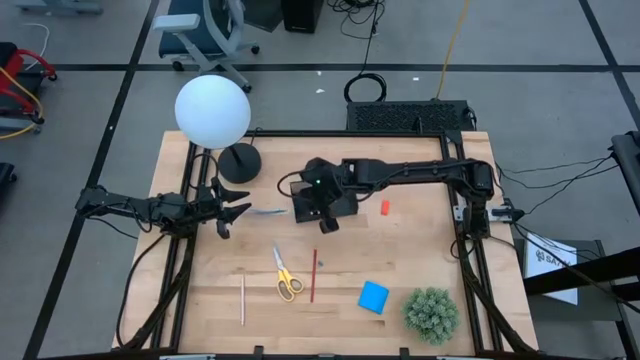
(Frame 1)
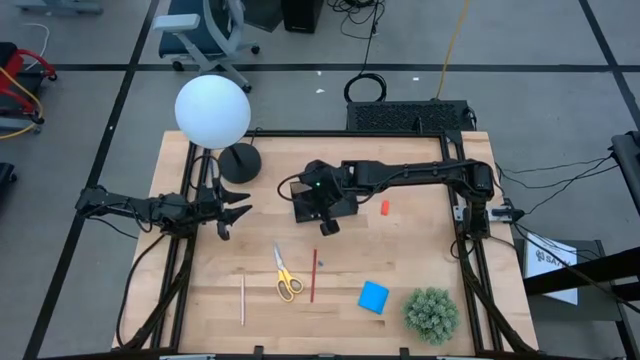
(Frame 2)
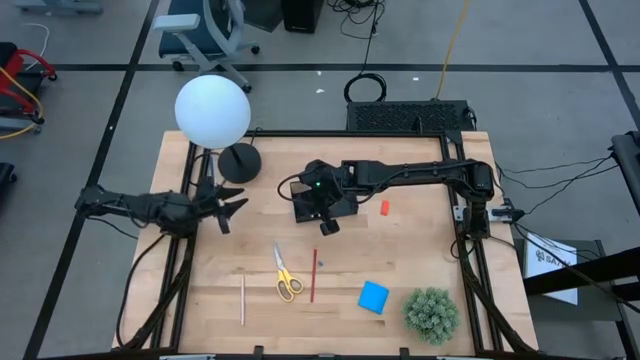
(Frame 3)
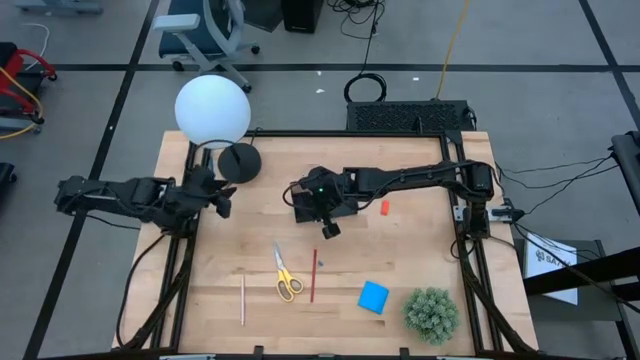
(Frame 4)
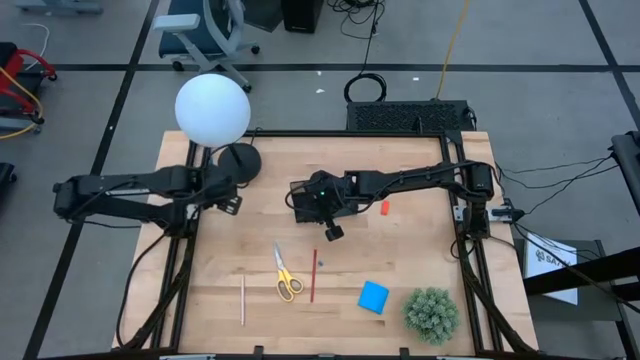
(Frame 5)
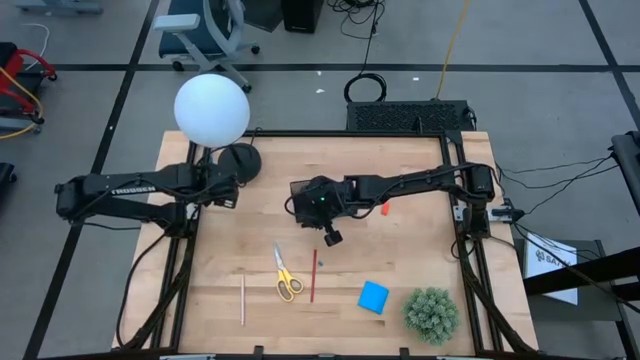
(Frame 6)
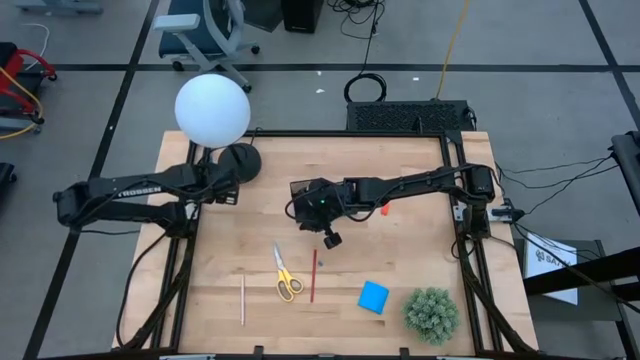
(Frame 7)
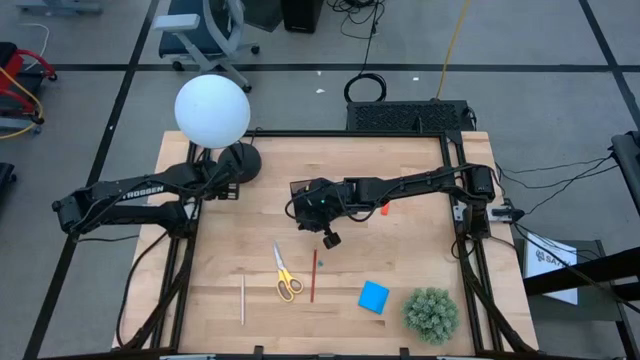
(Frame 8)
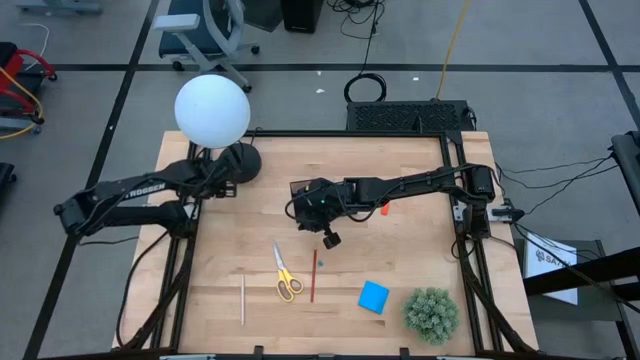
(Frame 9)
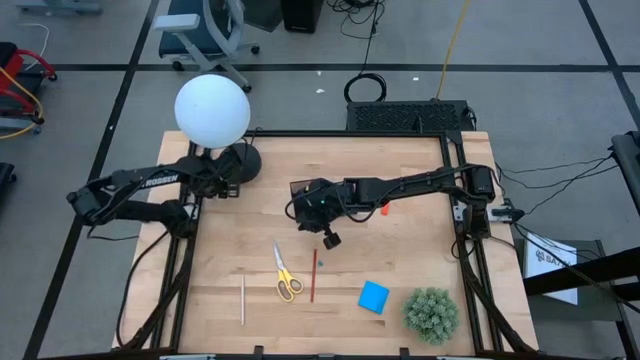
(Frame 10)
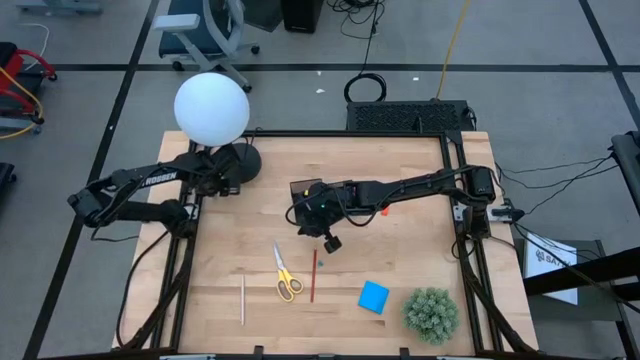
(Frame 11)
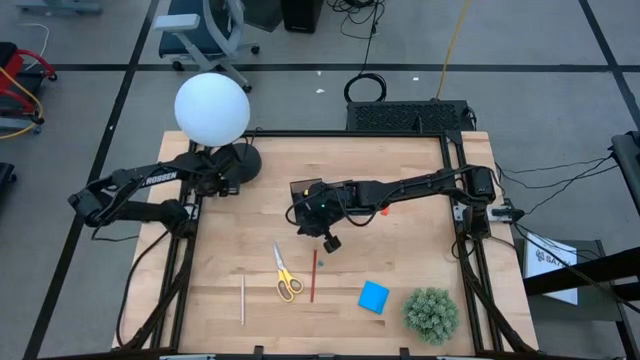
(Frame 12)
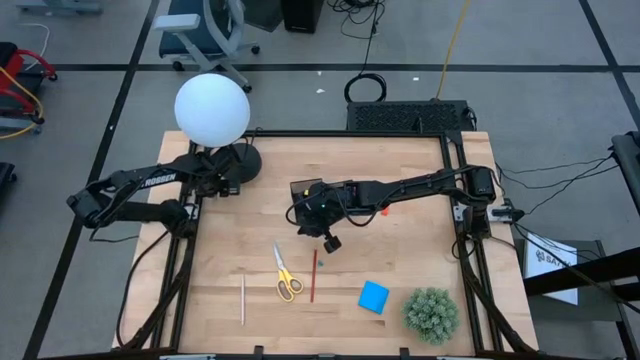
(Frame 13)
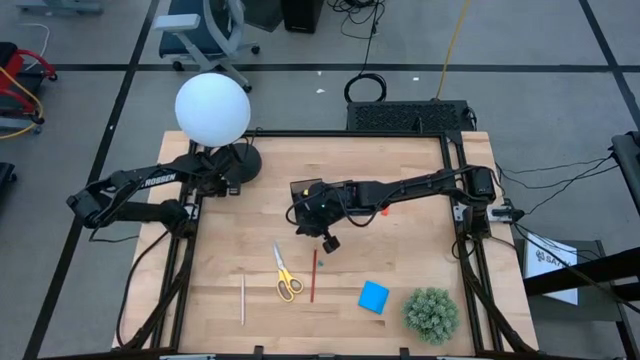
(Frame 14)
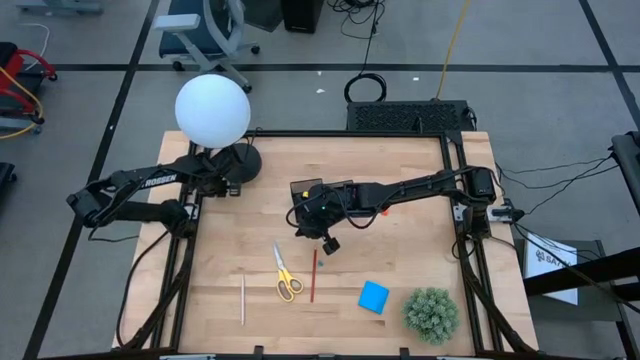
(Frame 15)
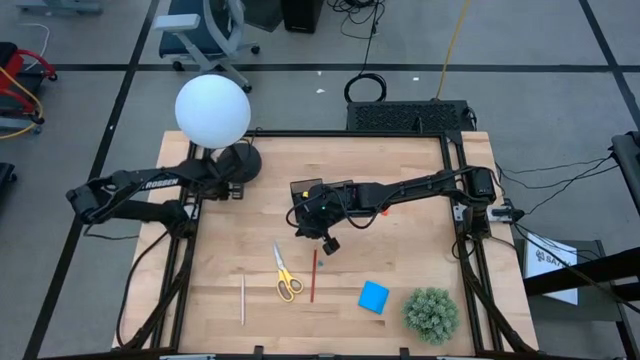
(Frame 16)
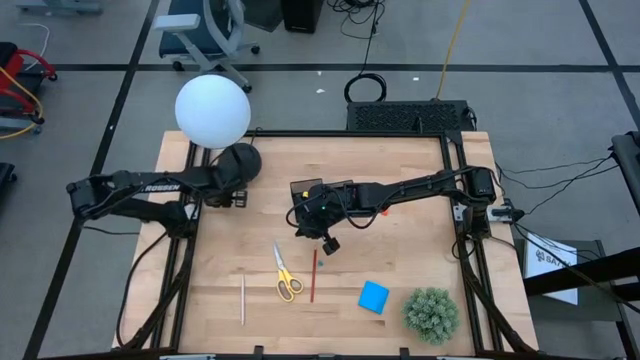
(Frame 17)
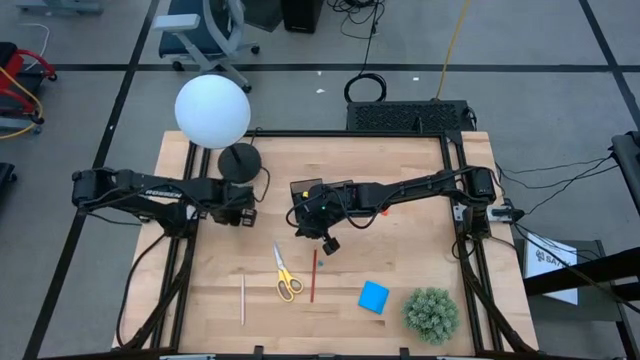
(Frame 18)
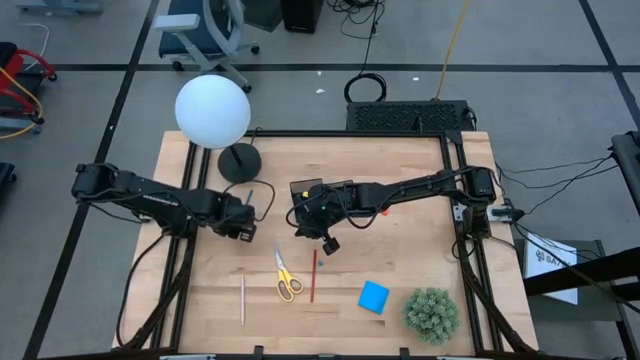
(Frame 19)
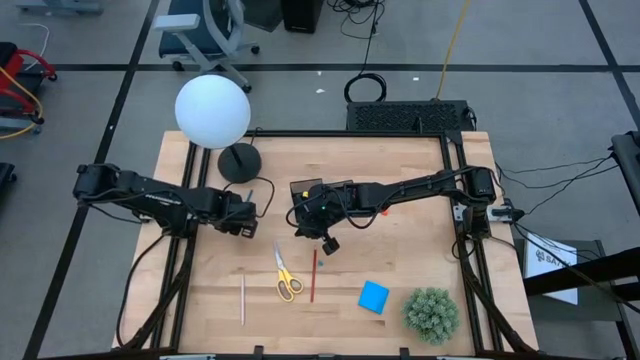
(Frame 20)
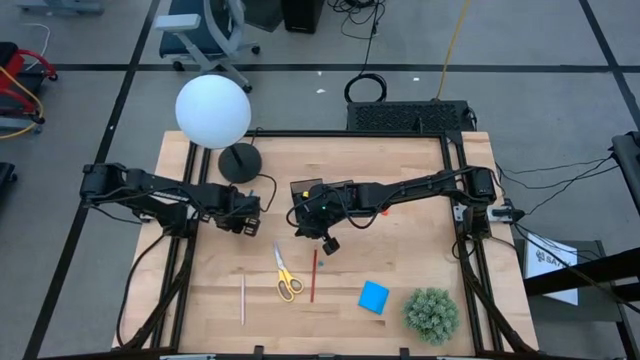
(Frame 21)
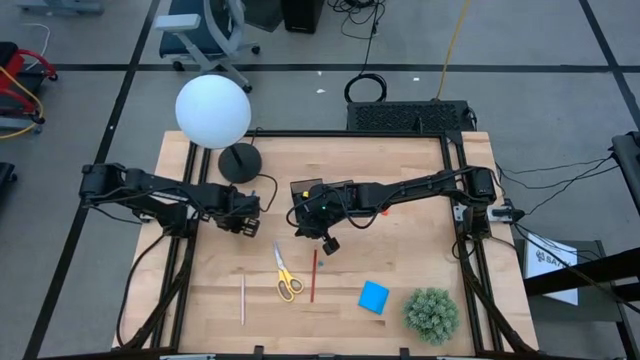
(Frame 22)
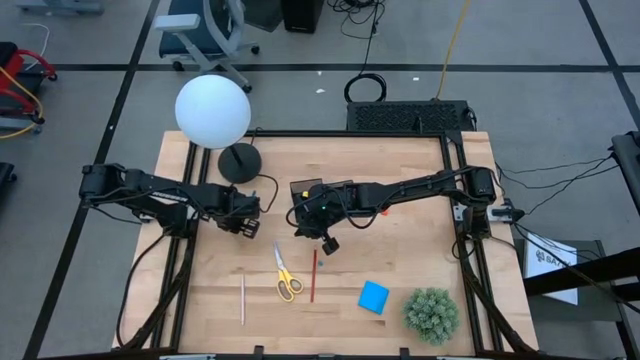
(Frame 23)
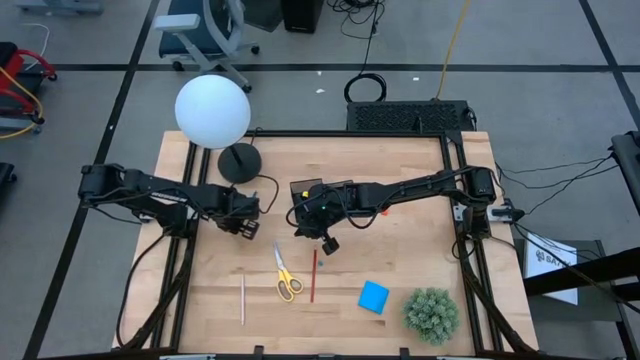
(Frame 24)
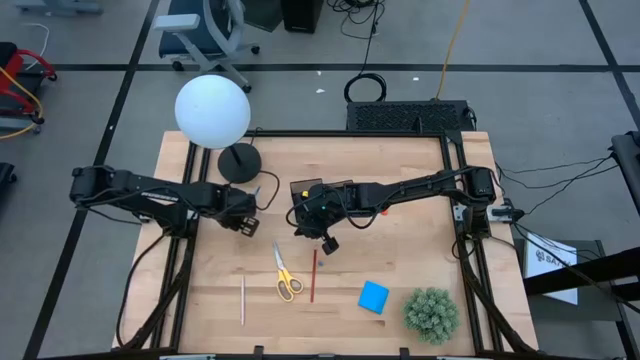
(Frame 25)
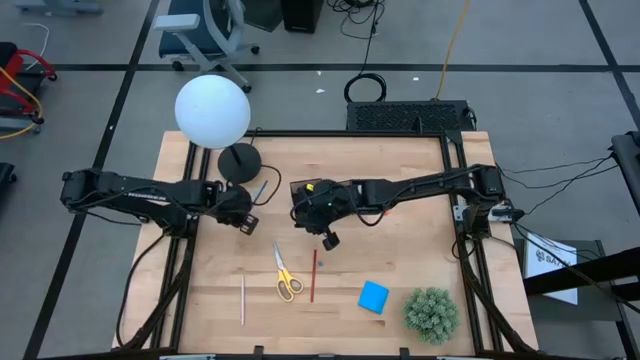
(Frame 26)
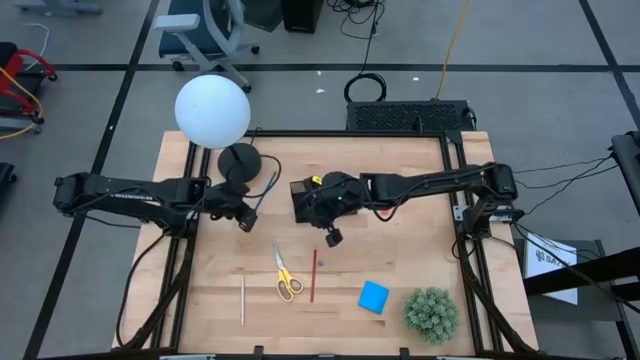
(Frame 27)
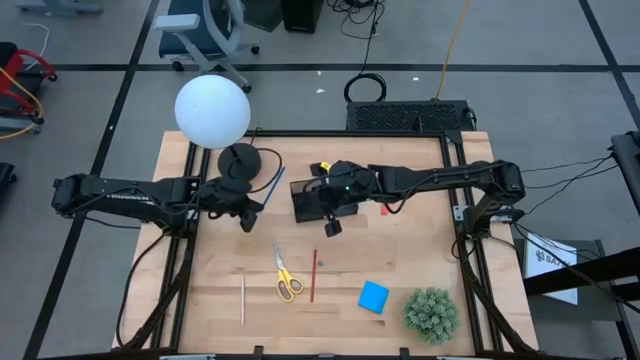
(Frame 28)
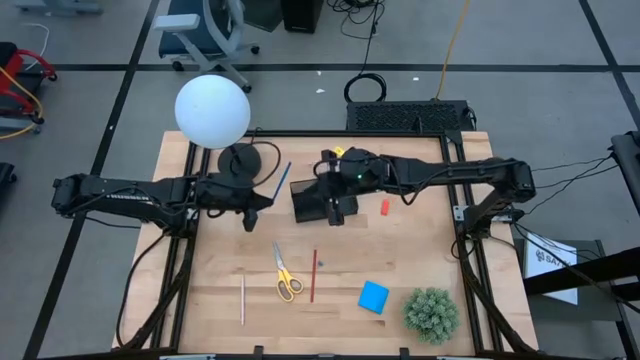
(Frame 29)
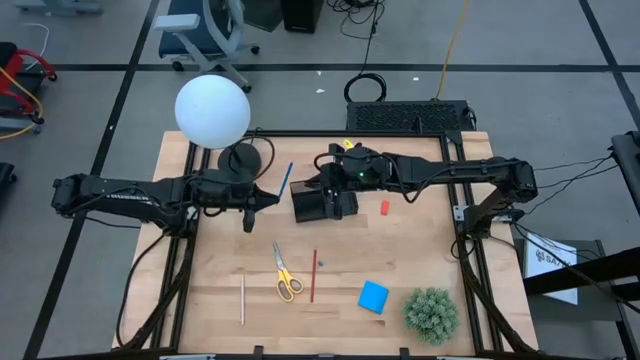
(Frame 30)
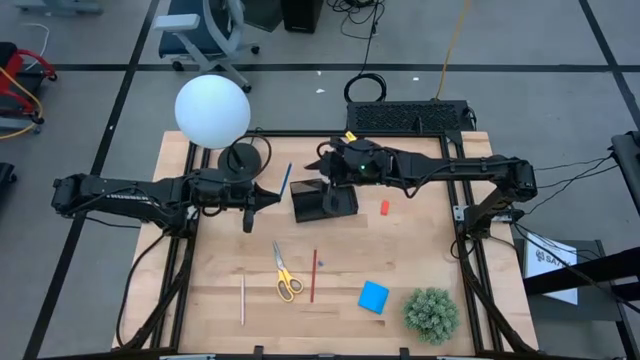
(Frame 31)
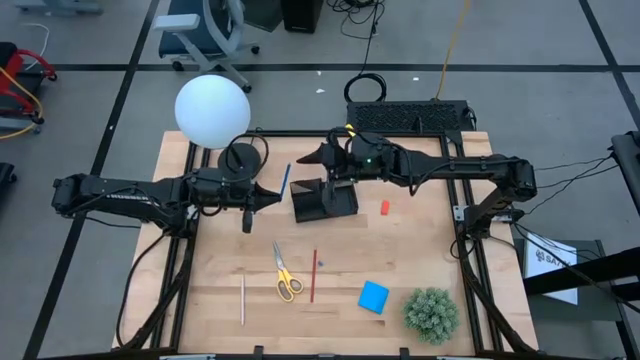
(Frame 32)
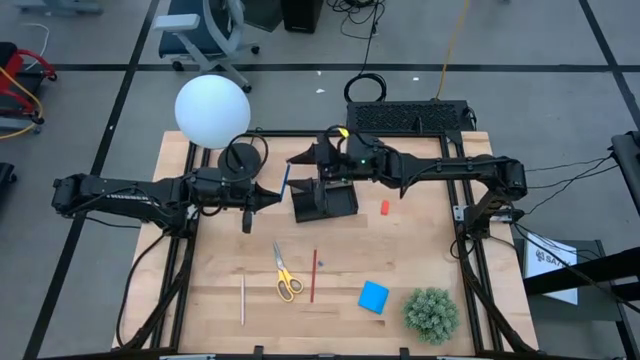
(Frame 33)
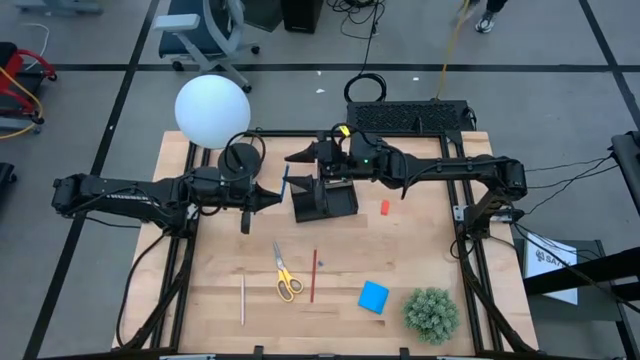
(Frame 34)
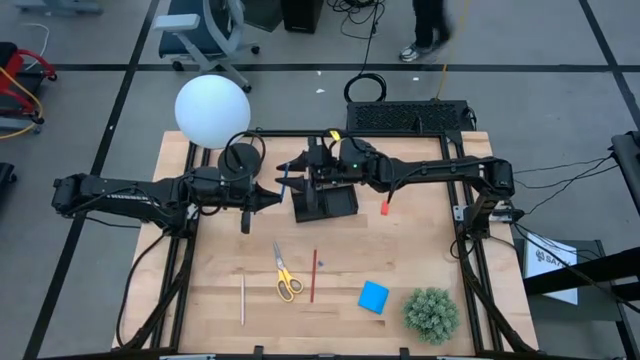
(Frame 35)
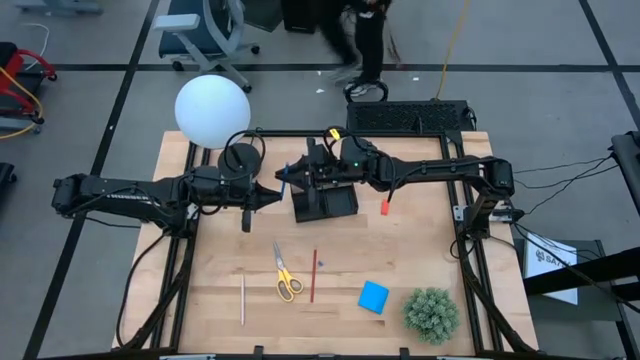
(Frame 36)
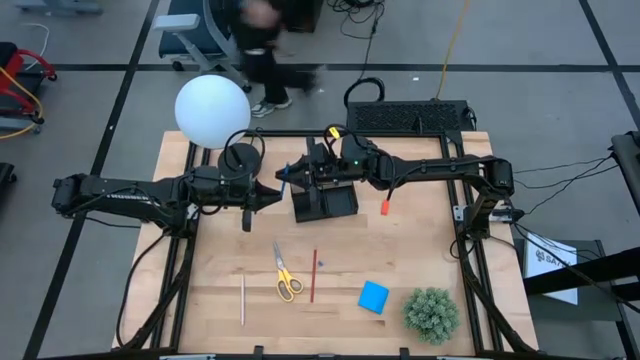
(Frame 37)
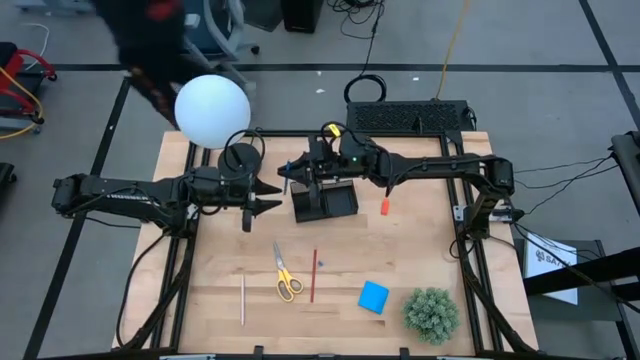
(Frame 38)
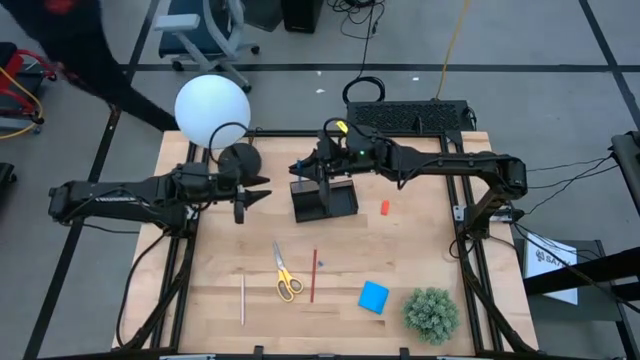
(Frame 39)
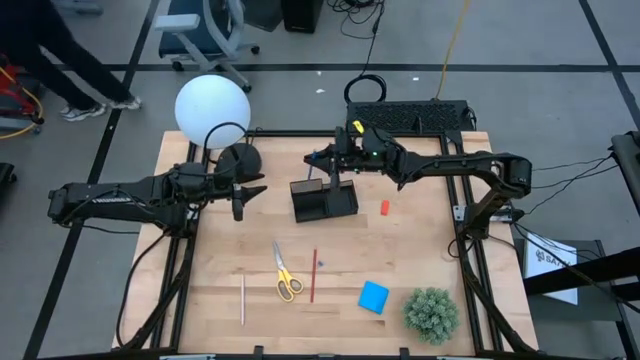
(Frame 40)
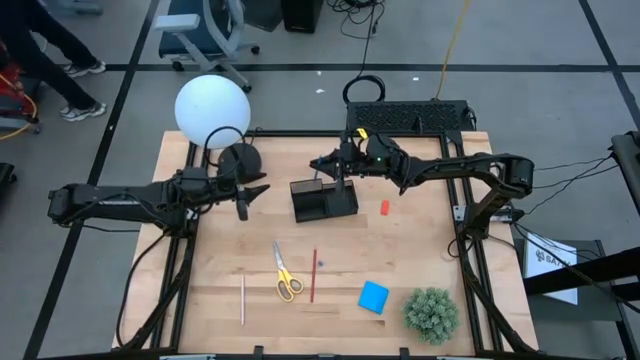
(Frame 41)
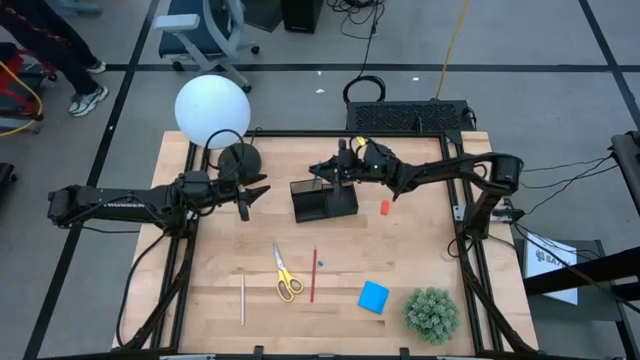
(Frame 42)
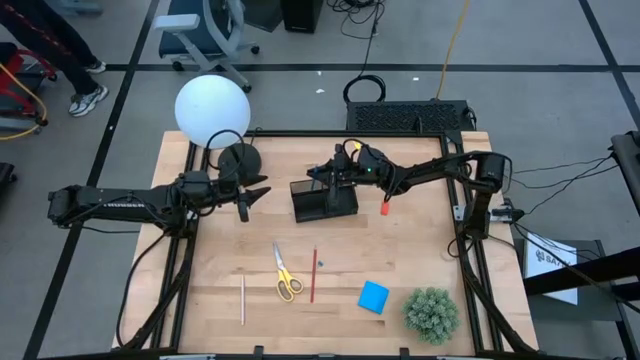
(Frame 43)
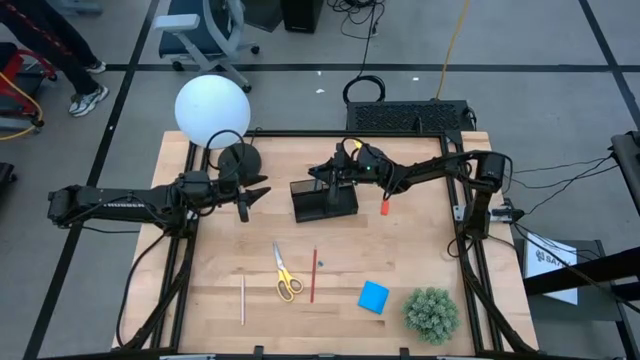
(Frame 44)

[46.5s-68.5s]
Task: Pick and place office supplies into organizer
Put the blue pencil into the desk organizer
